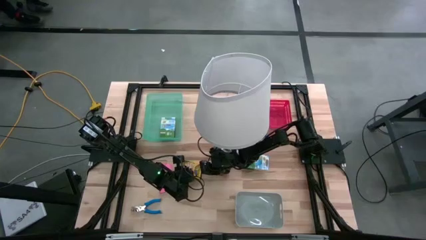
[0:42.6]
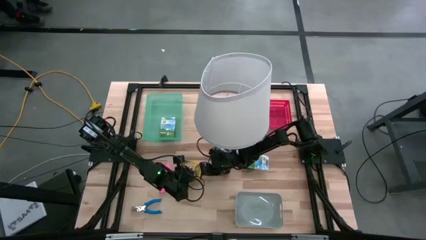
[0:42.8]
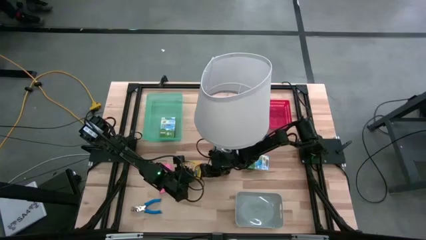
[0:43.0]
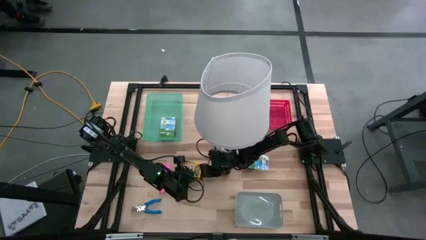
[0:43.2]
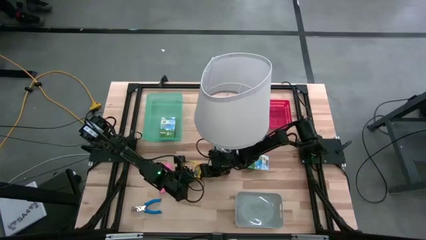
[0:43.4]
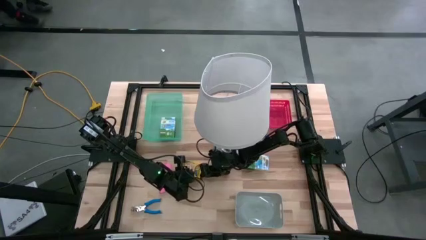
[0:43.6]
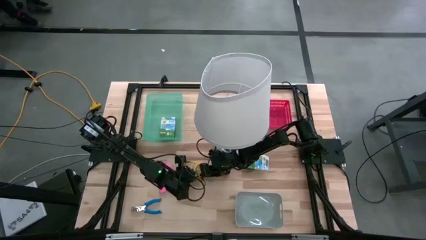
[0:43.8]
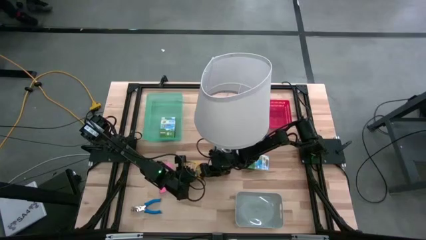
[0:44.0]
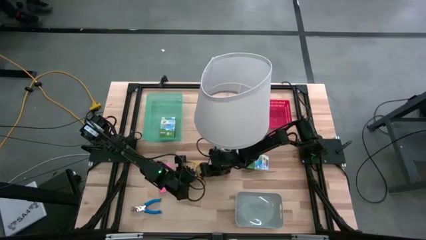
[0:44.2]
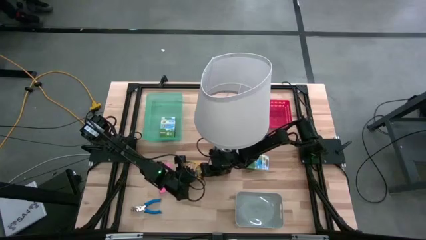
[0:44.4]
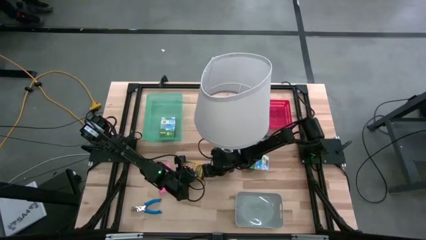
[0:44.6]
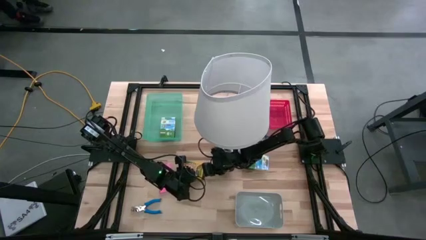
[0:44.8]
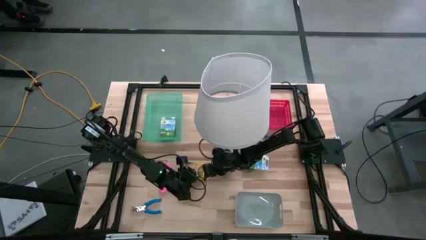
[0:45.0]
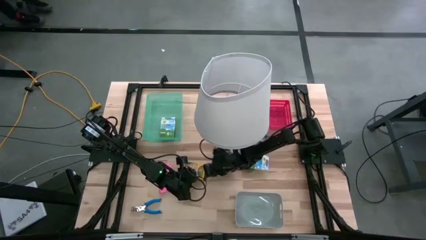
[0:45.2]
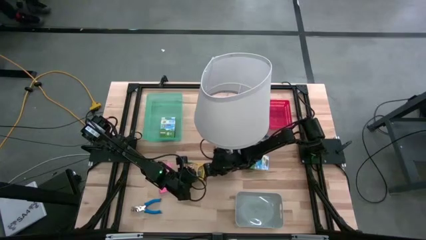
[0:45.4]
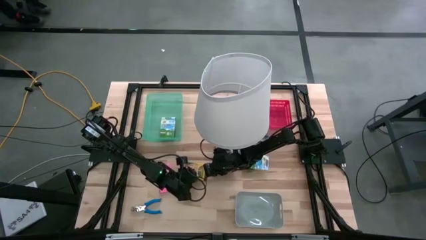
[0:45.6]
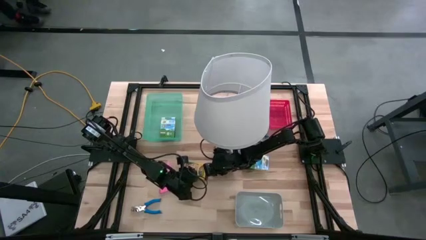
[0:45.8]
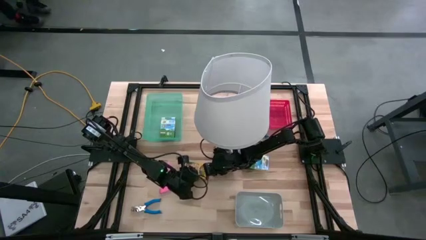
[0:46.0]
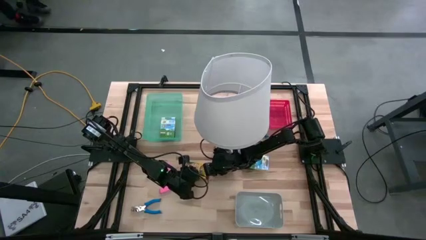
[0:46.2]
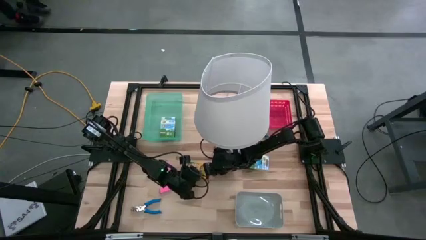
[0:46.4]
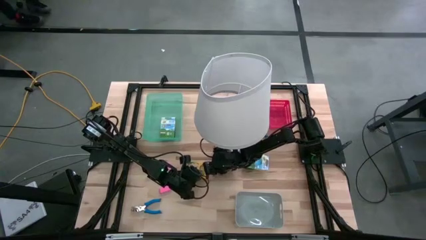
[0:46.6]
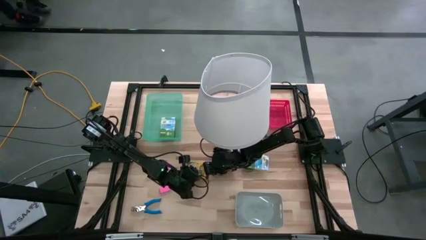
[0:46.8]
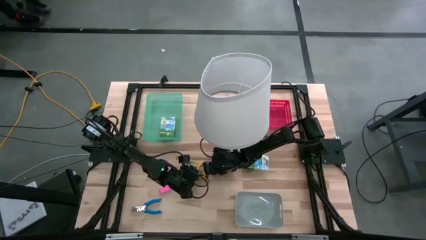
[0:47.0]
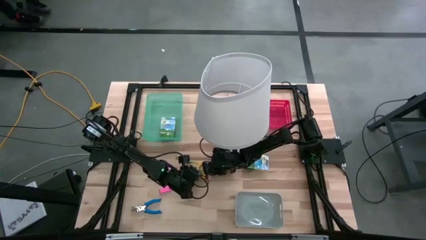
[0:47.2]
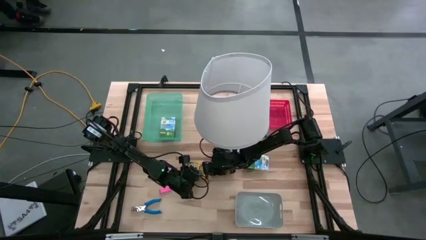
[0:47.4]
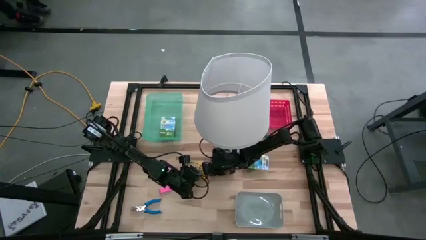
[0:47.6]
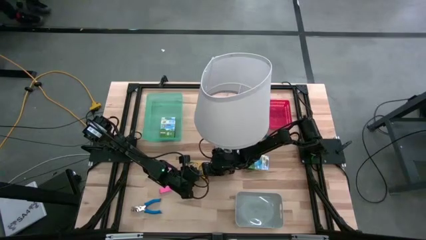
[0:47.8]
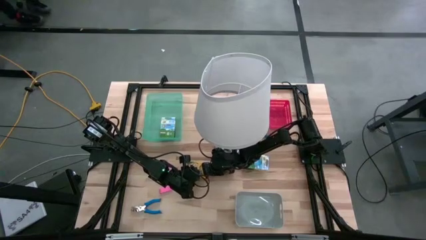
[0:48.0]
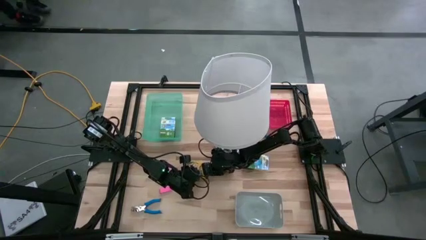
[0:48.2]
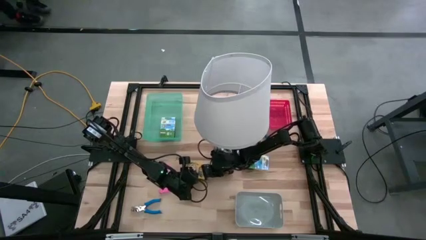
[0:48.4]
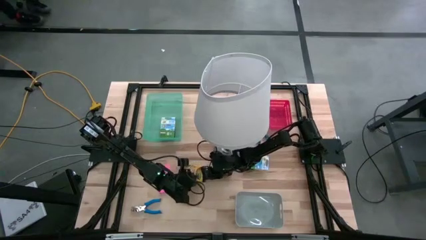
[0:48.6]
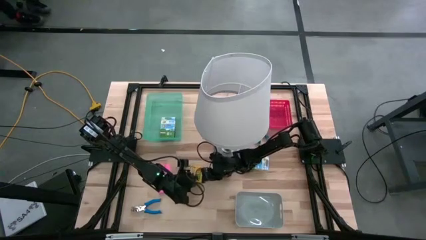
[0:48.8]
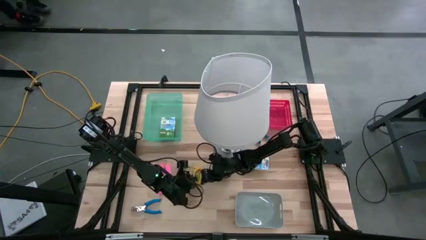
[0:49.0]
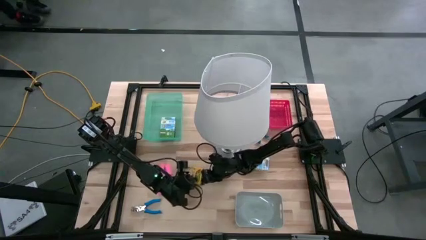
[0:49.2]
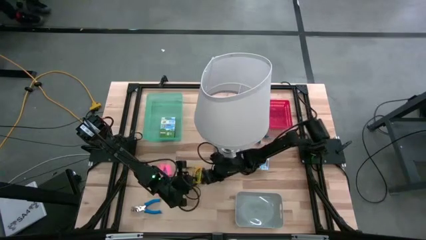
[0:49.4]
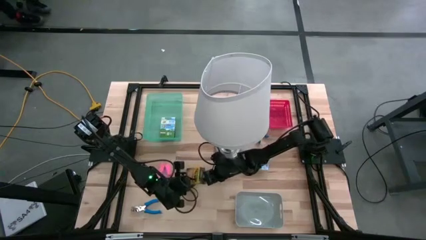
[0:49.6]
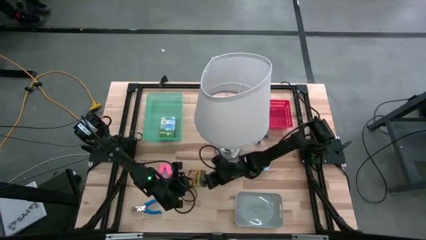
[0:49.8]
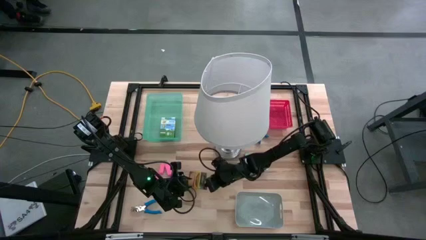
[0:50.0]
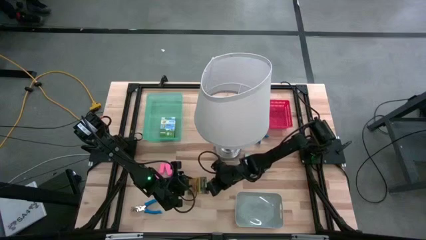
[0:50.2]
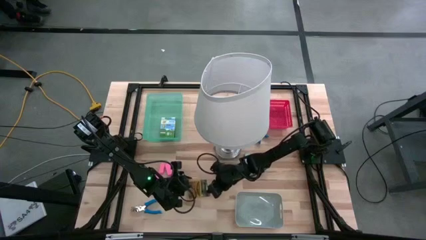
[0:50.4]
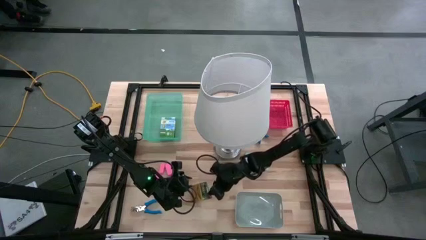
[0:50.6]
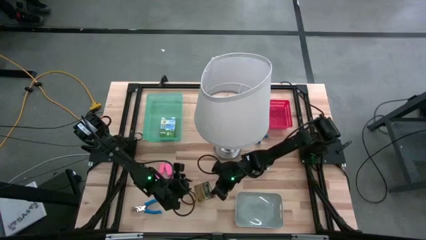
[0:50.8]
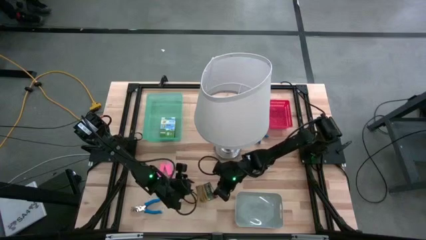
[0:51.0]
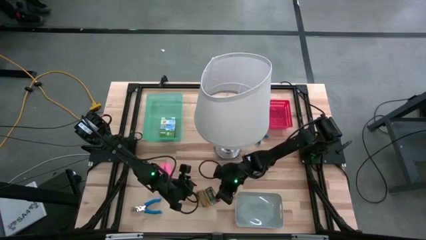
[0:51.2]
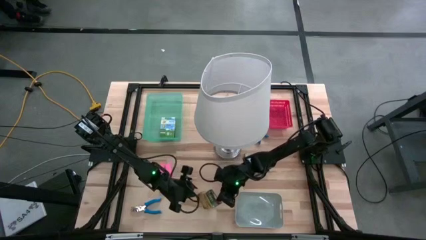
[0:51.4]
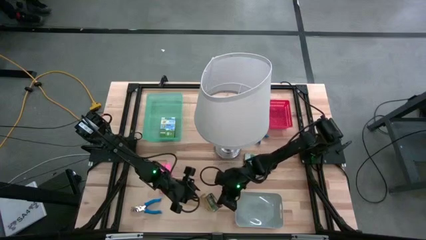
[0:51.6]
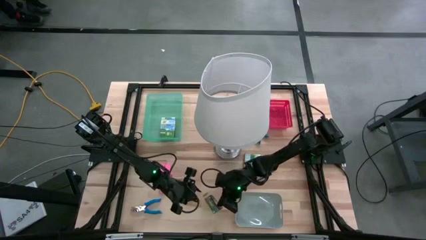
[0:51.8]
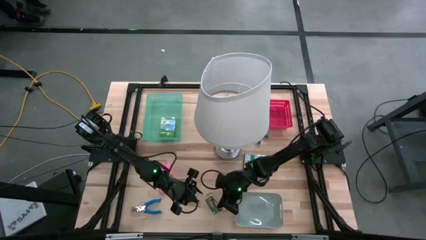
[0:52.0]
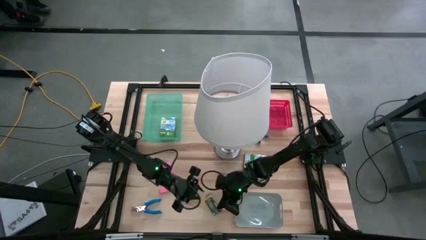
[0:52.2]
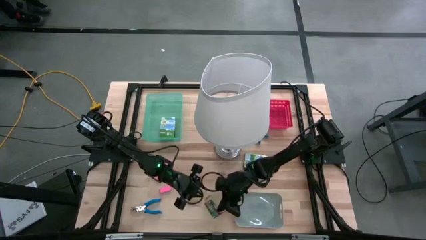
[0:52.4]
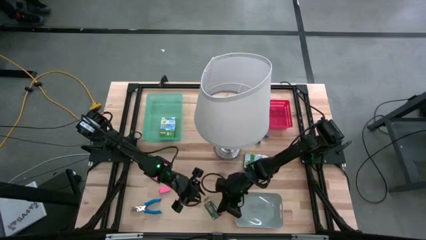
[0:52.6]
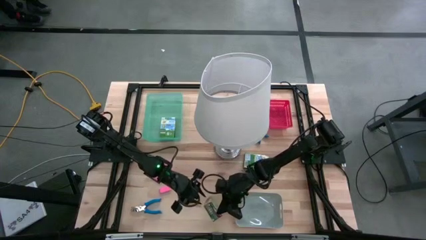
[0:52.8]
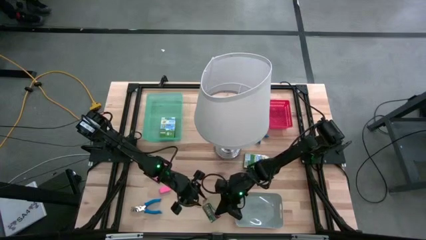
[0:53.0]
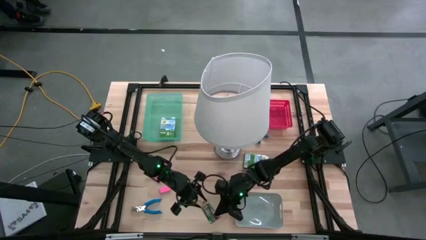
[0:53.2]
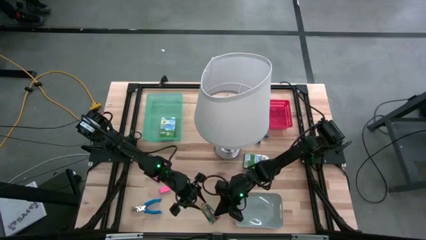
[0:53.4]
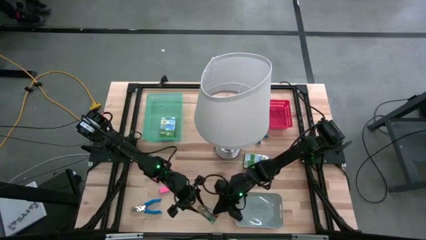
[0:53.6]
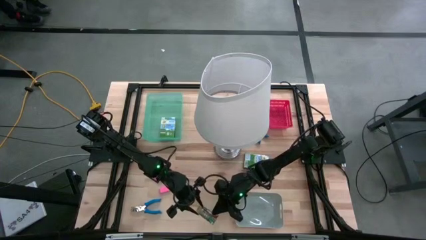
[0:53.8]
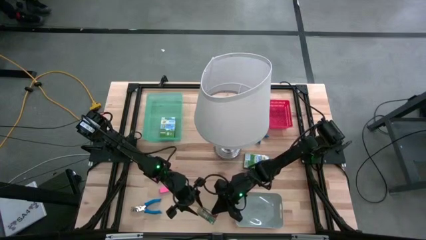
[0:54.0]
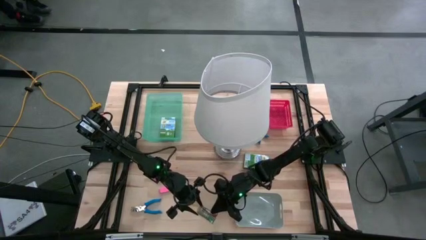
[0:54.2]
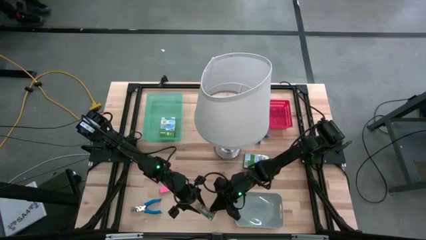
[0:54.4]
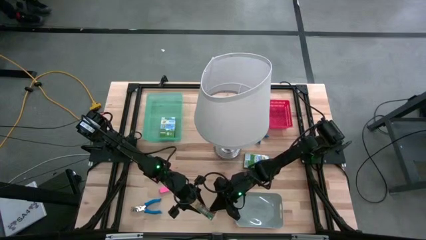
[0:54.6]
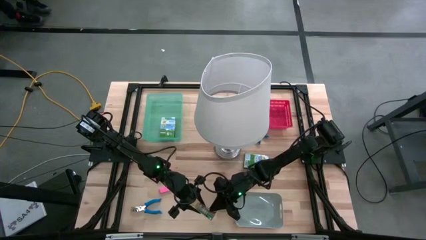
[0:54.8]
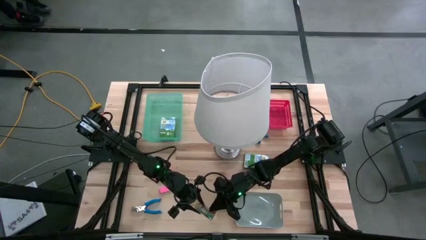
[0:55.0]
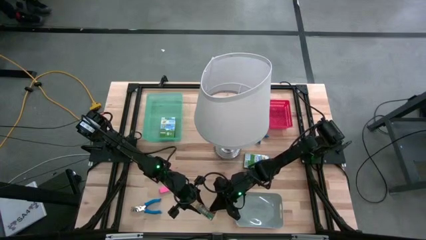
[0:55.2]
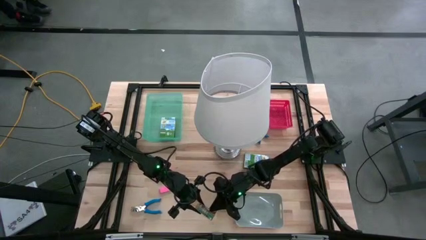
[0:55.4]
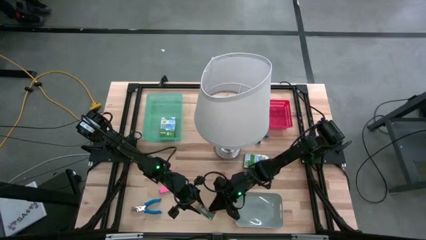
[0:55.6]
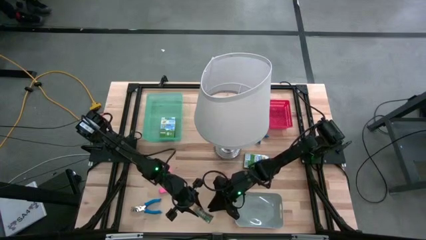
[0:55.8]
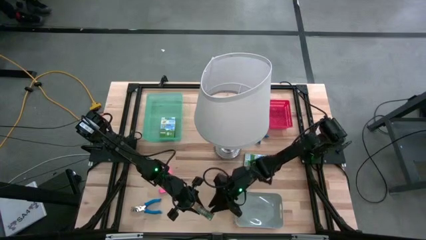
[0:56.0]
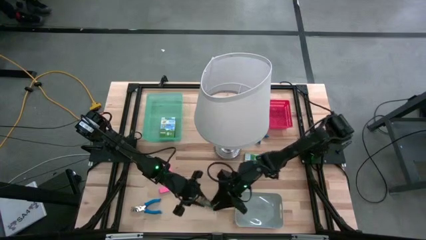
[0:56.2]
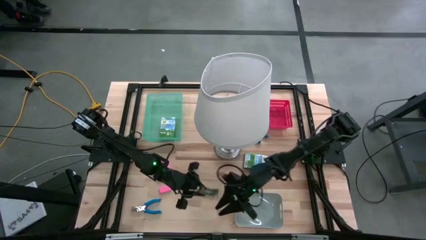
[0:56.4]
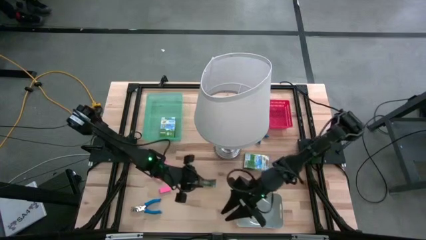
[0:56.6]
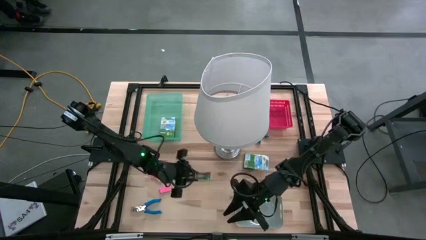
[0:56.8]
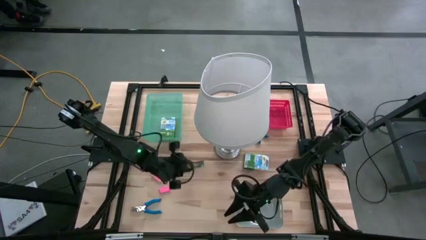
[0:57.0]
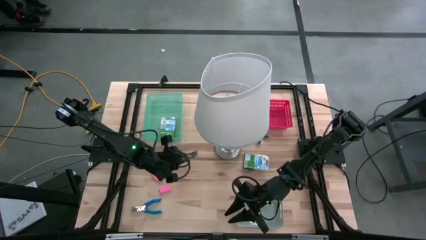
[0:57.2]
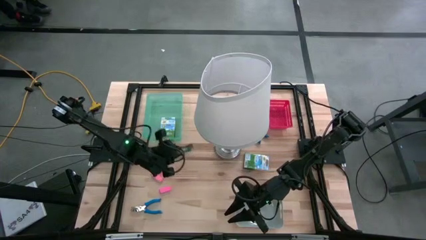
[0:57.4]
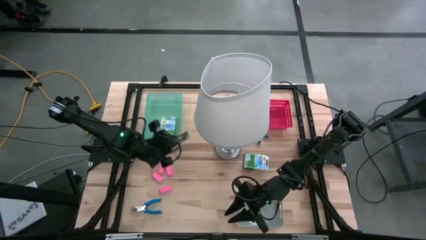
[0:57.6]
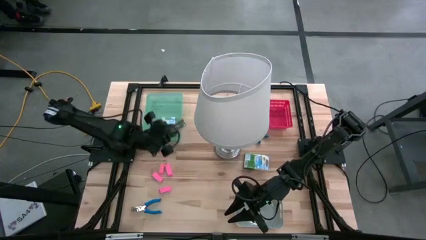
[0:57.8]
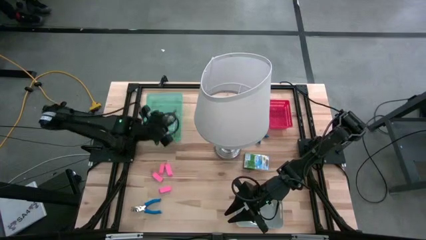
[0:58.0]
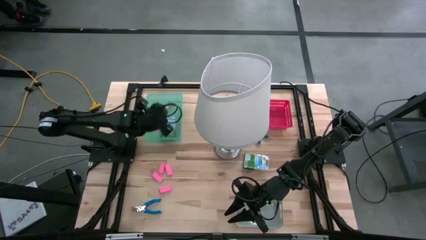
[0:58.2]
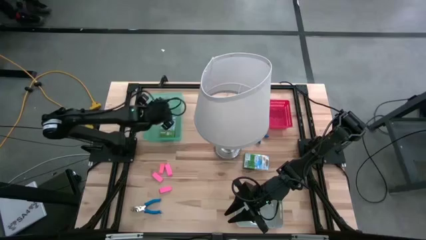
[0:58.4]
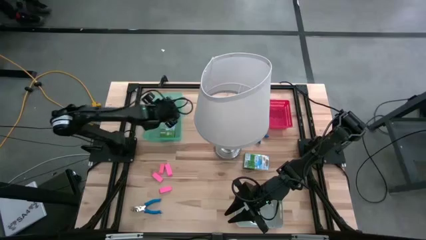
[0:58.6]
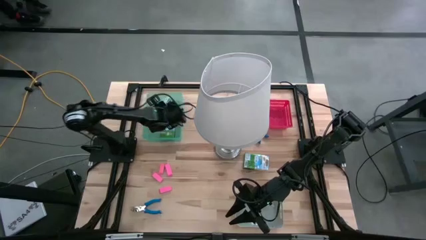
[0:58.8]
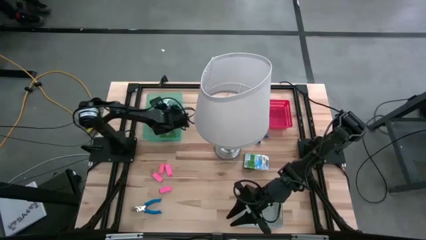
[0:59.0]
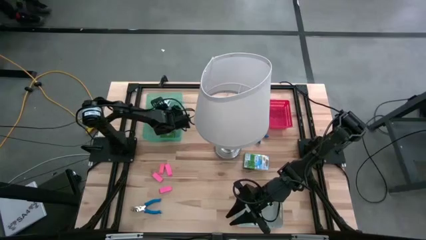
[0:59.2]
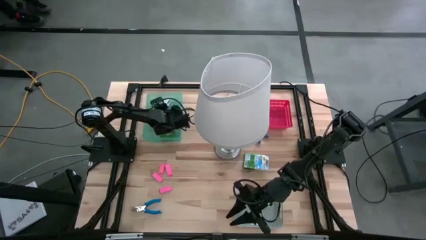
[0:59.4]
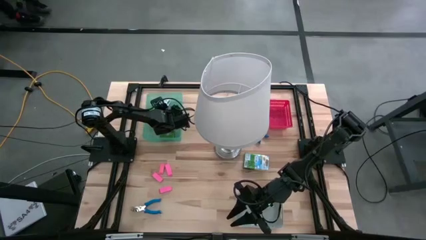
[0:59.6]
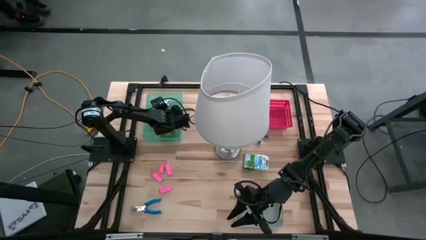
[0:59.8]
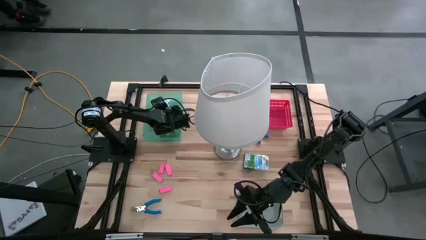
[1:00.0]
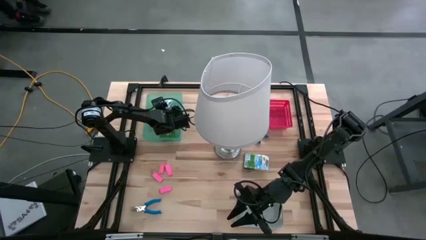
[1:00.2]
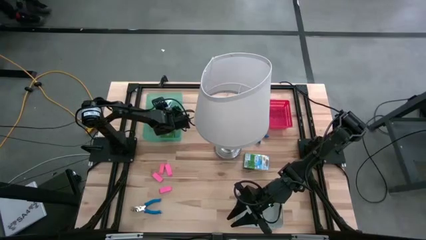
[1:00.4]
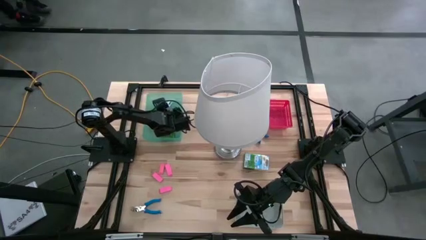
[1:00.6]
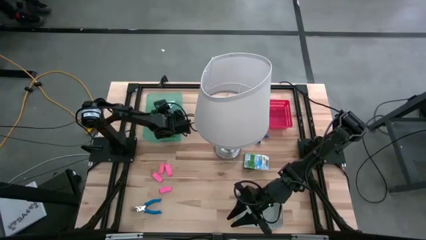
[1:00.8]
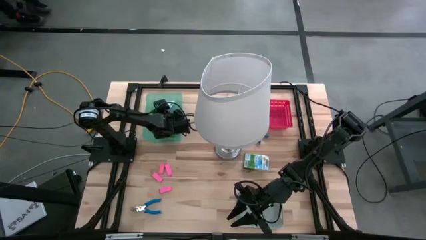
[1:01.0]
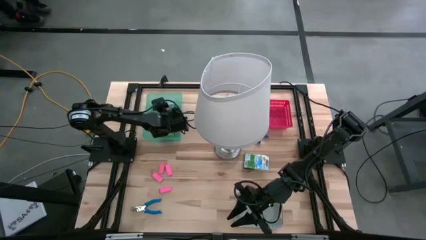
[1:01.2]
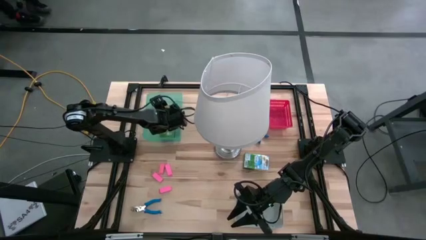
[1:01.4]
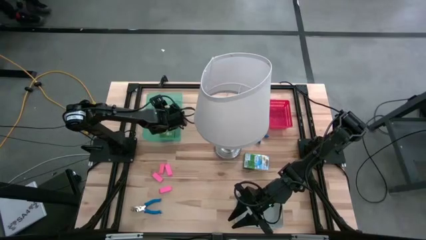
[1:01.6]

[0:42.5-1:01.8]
Task: Pick & Place School Supplies
Put the yellow crayon box into the green bin
